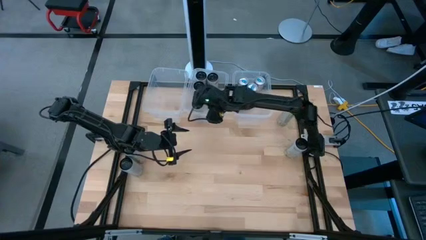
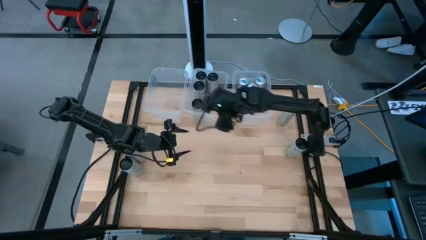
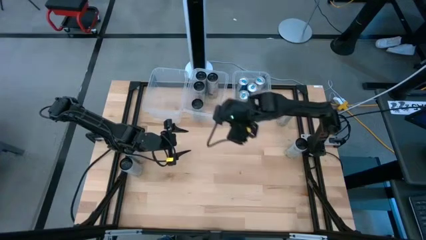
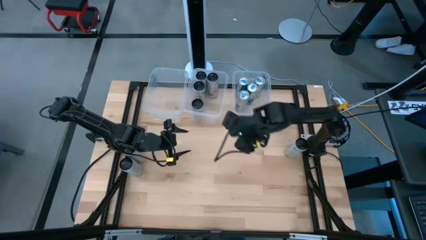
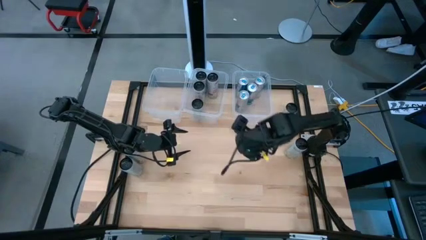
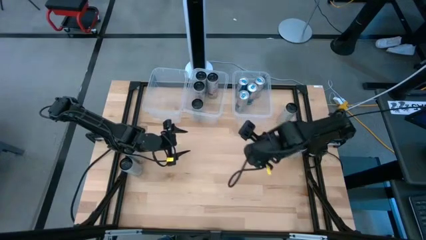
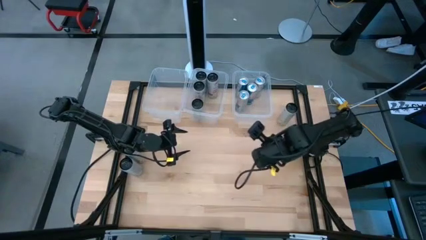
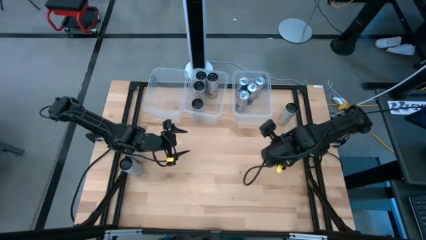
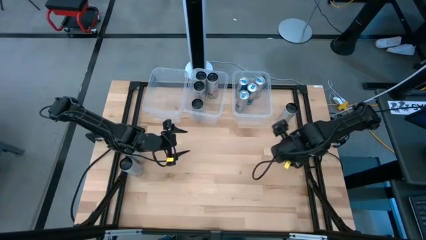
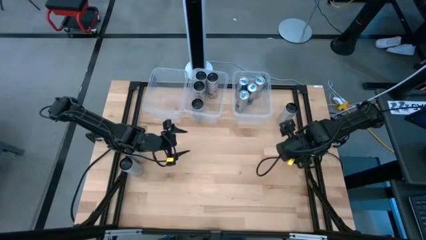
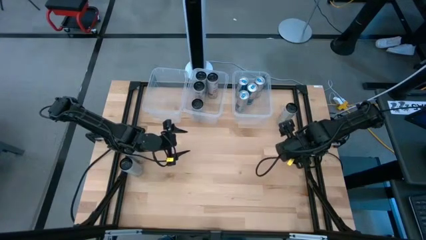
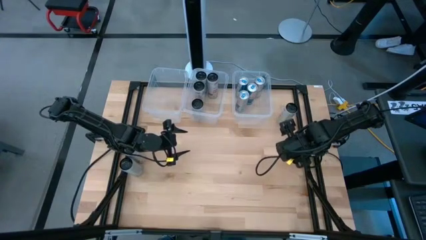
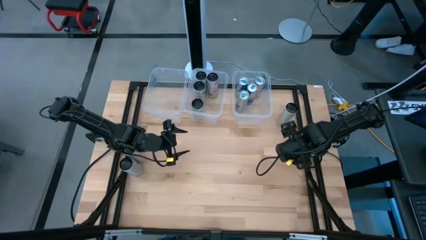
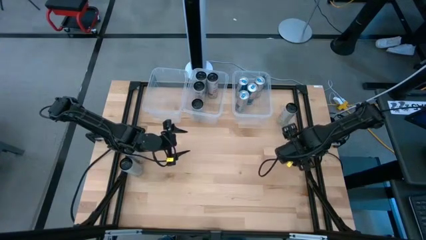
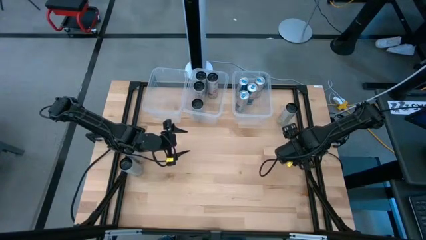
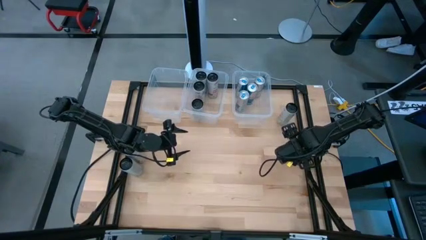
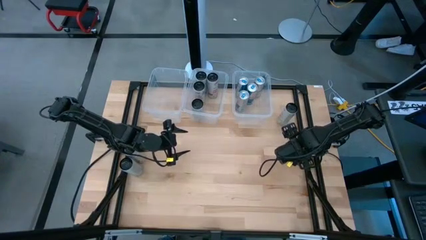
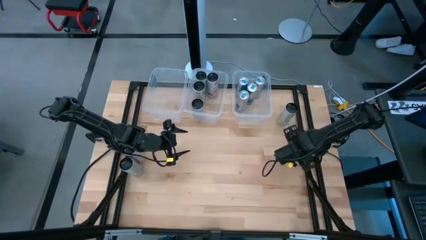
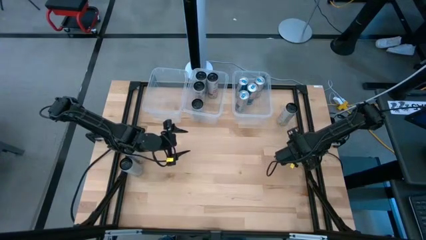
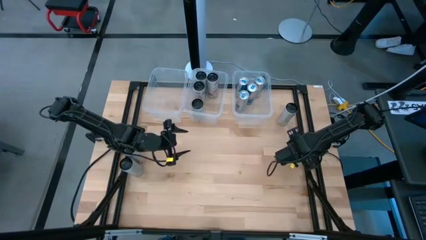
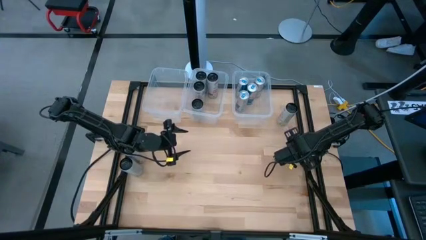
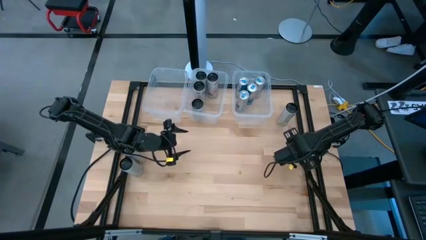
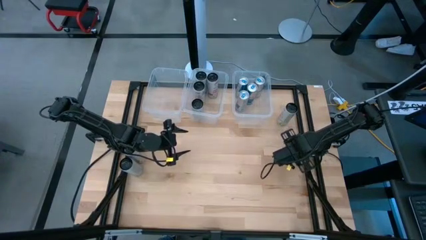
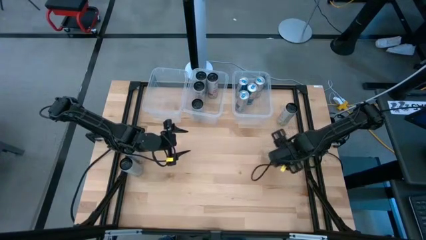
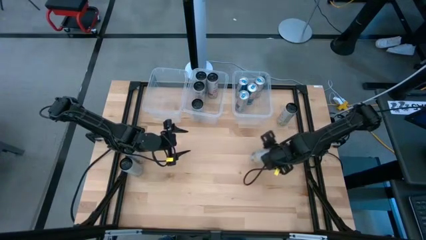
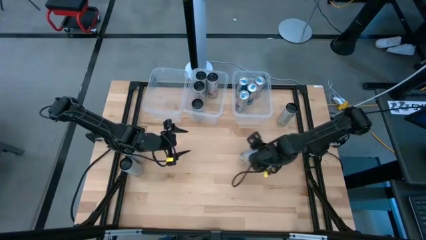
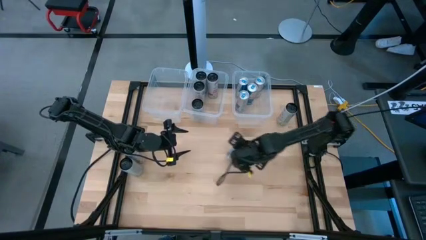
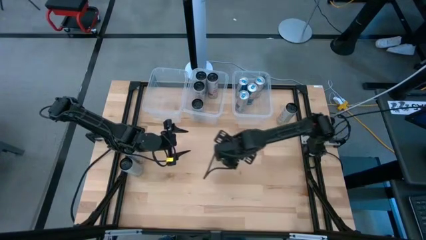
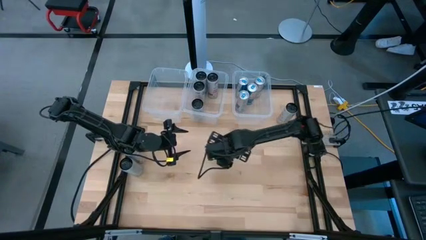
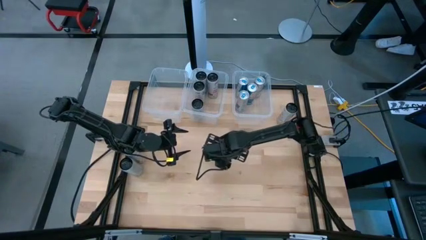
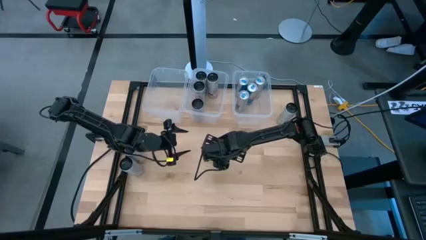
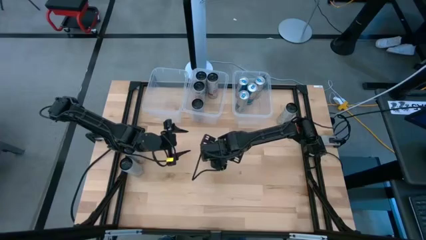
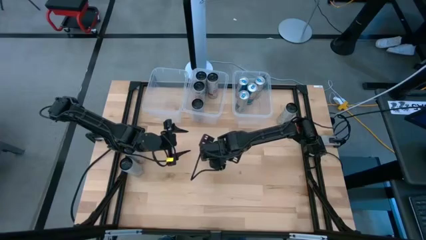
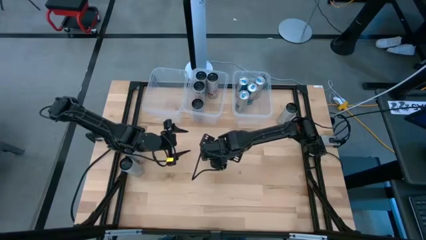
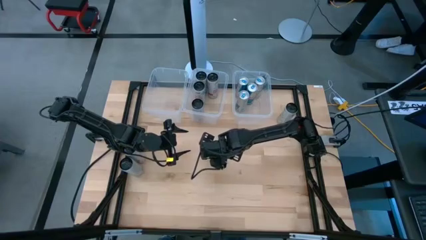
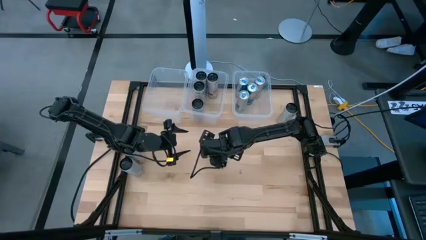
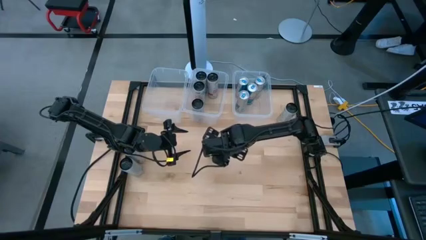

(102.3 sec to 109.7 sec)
Task: Sort soda cans
Move the white-yellow soda can to the center of the table

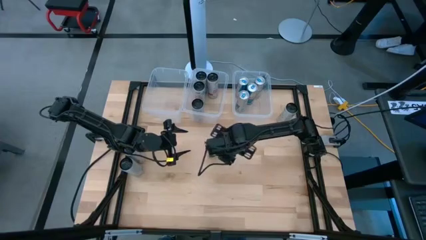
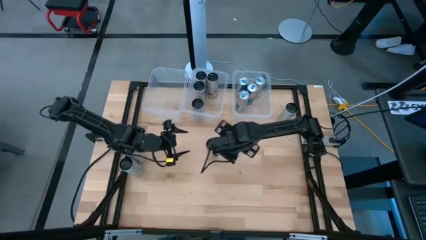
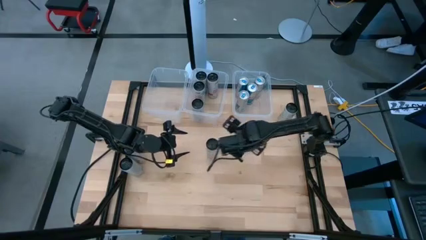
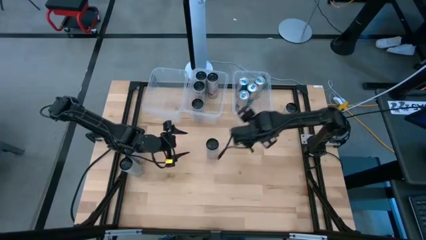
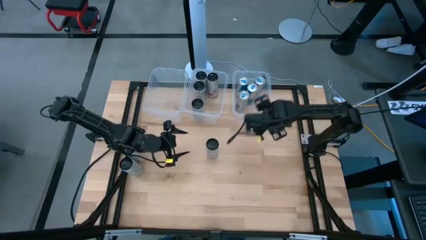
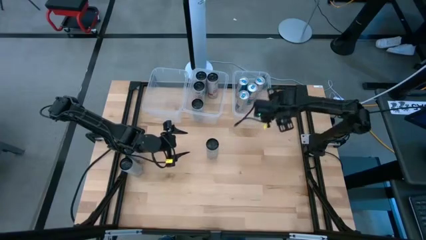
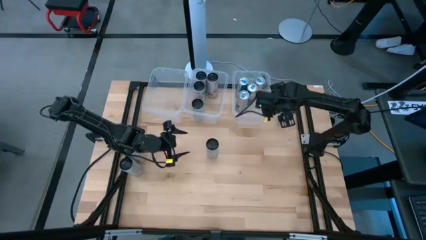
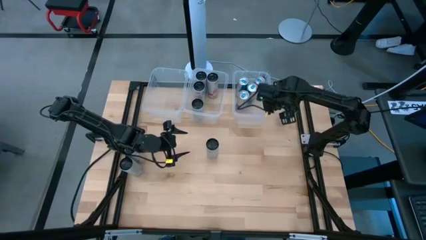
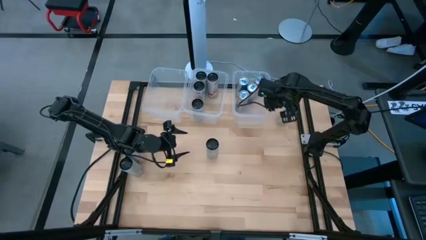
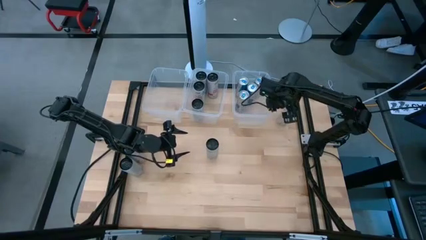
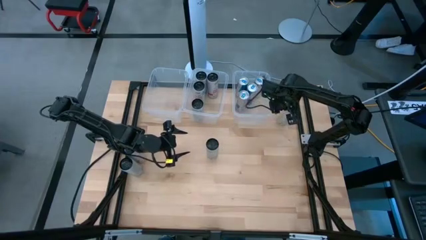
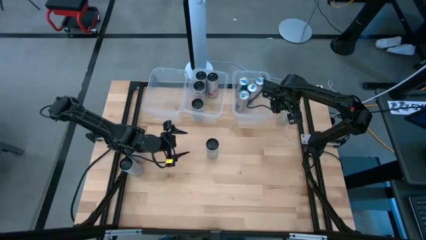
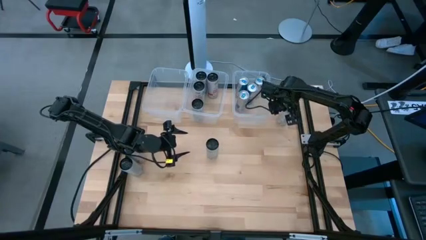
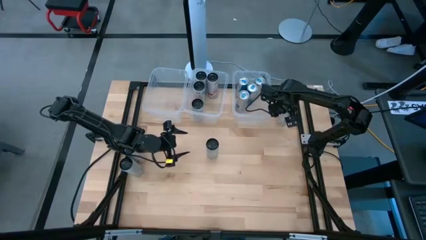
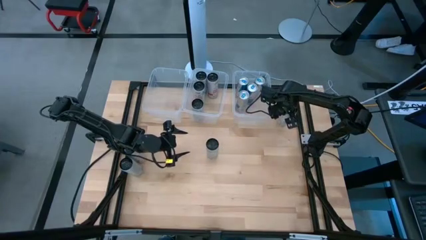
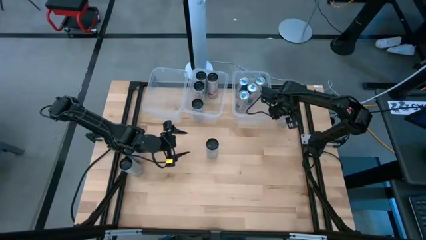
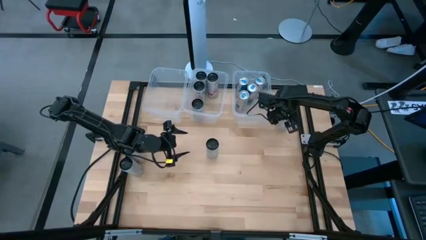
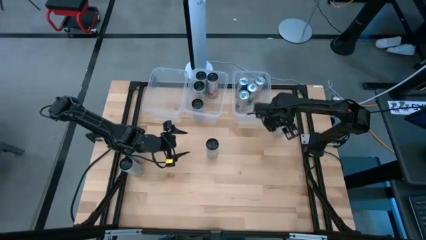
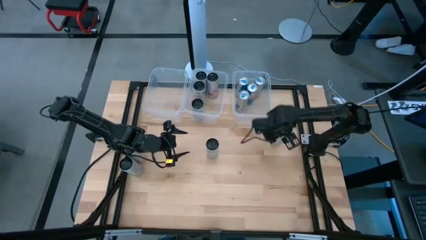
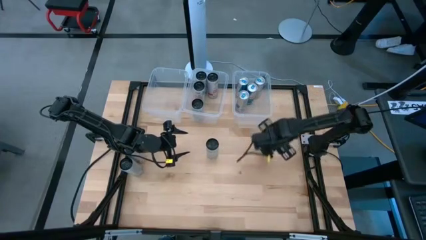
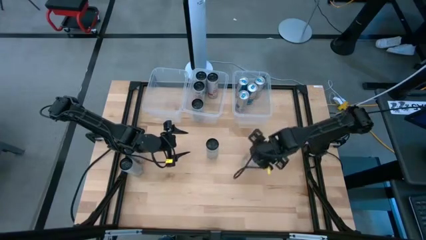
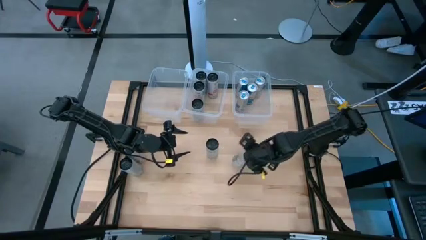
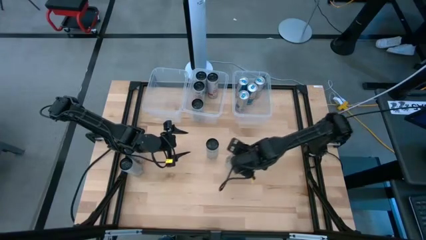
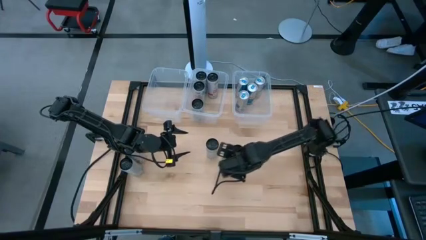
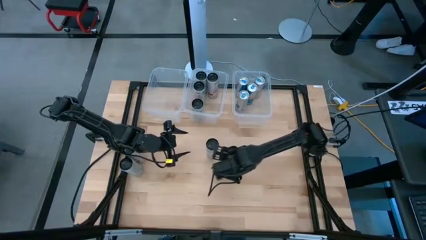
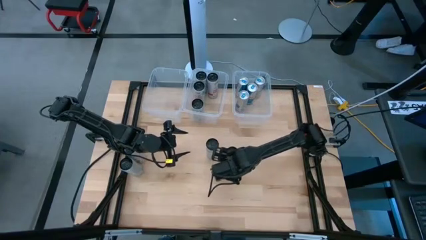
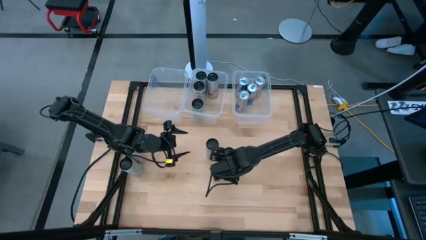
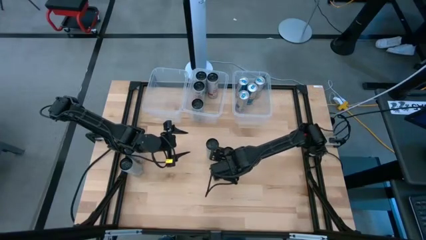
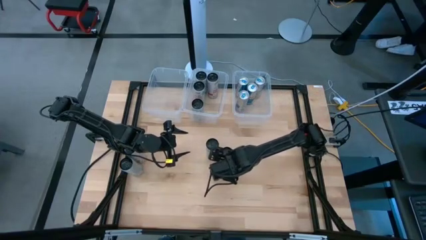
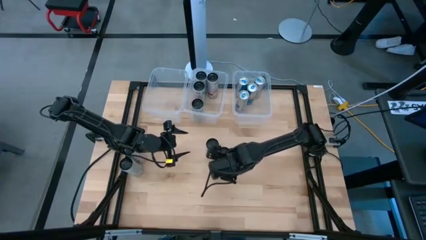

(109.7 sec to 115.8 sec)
Move the white-yellow soda can to the center of the table

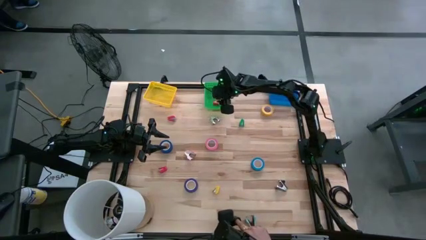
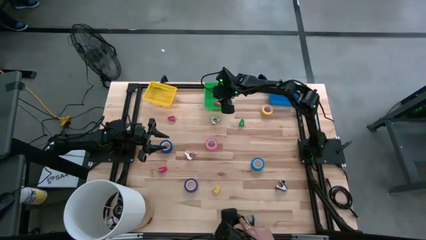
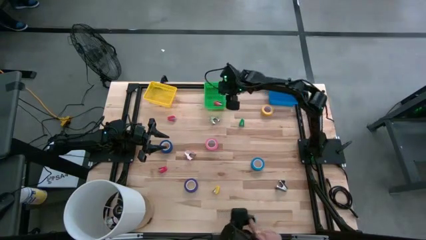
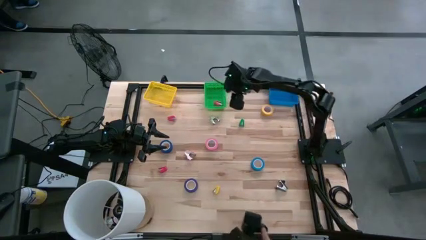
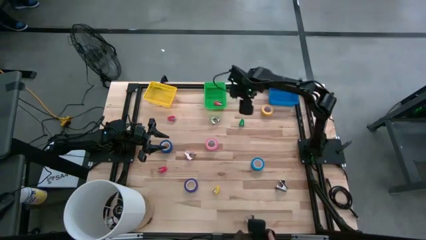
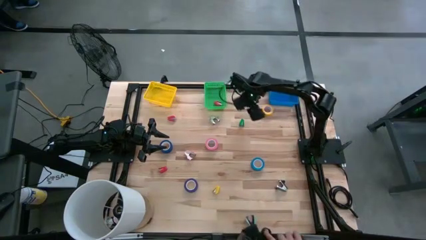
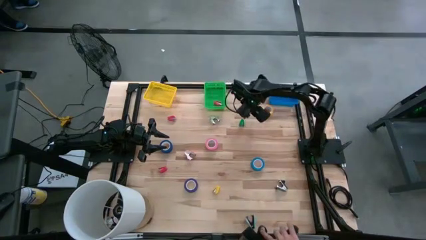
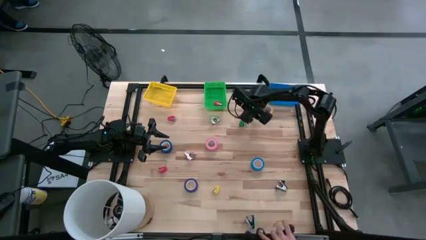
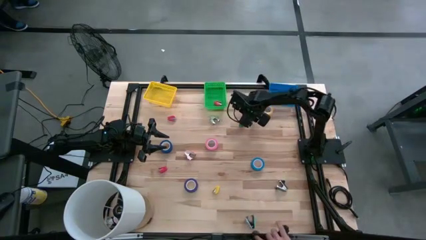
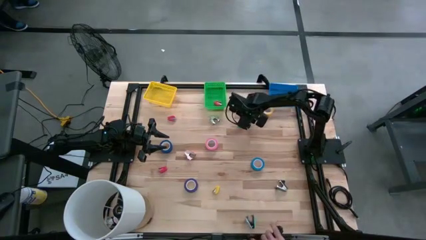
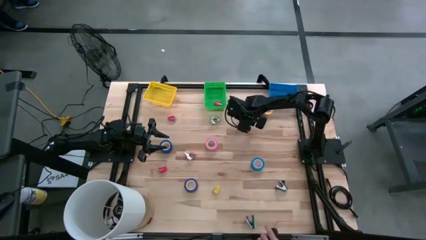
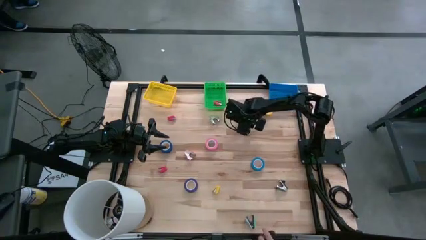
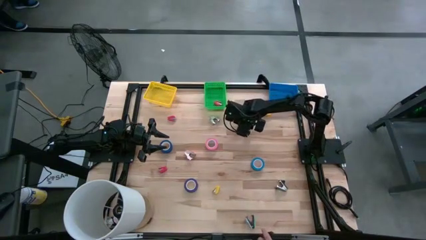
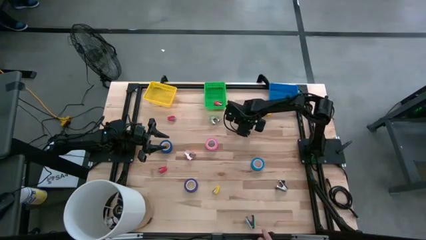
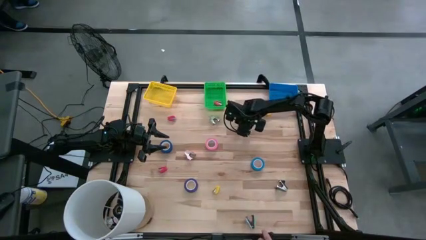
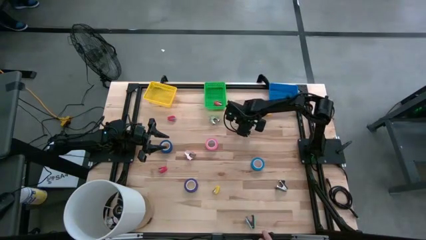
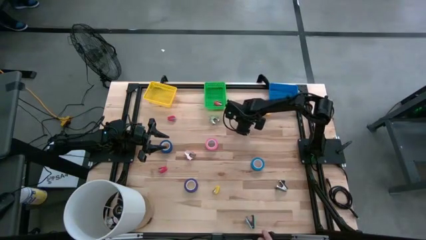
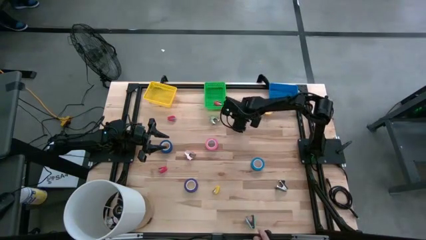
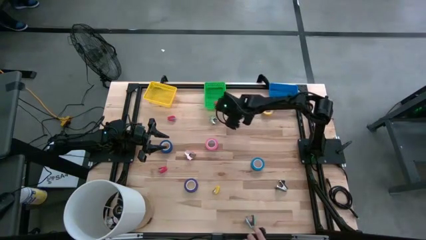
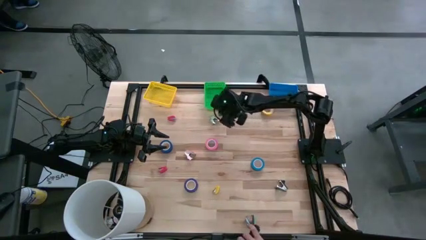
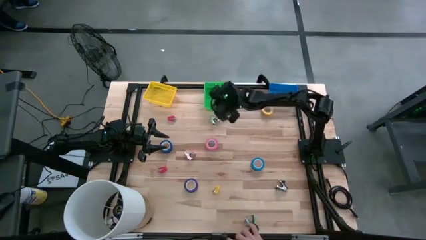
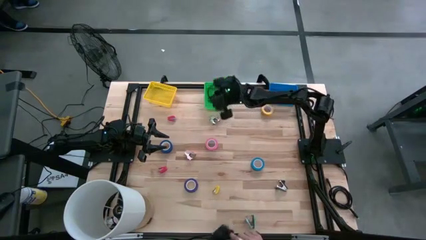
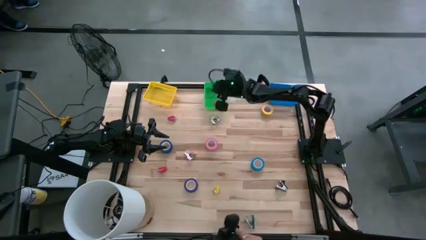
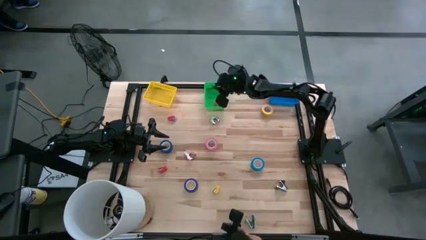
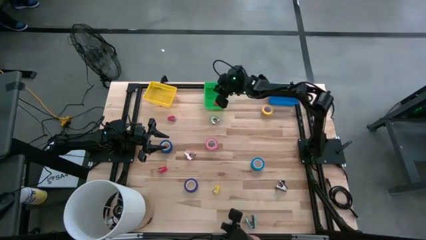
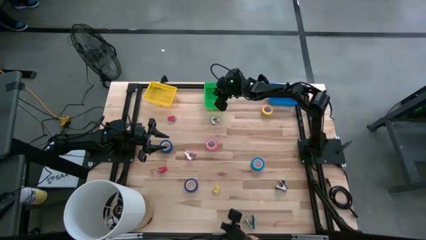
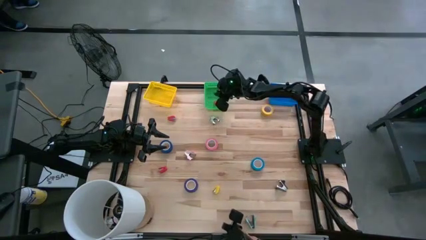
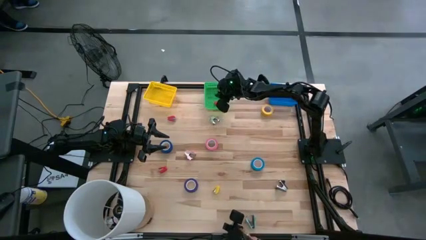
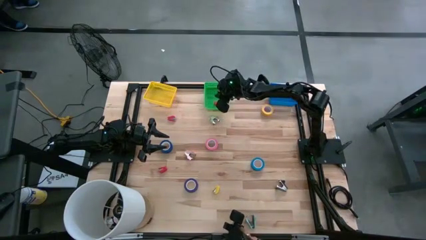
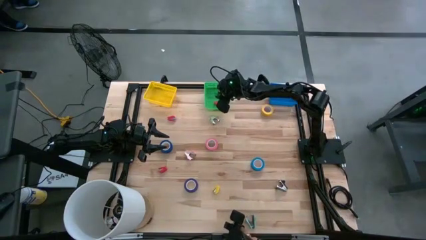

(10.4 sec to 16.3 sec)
Task: Pick and place Stapler, Stapler remover, tape
Put the green stapler into the green basket
